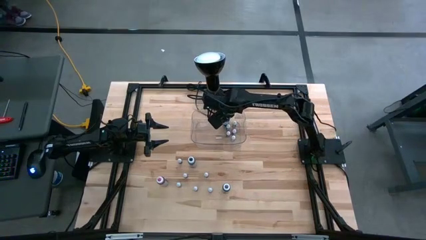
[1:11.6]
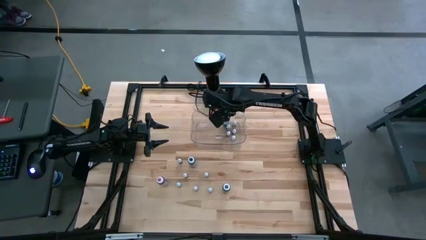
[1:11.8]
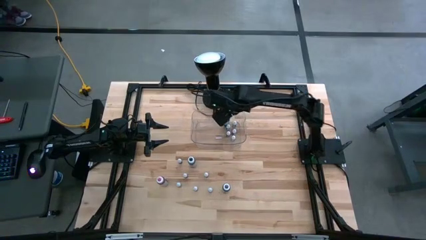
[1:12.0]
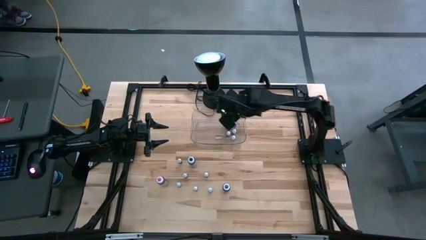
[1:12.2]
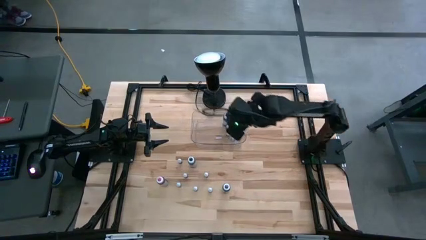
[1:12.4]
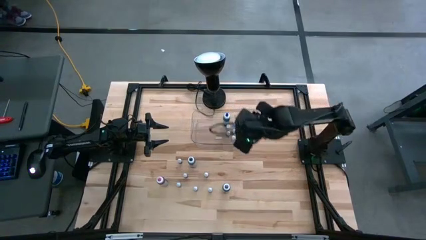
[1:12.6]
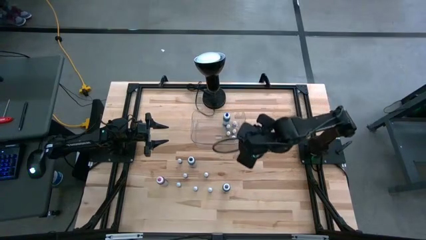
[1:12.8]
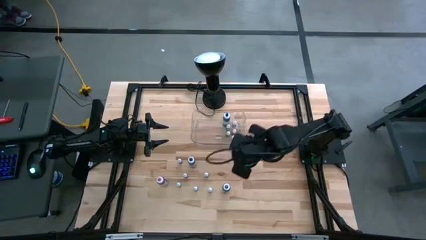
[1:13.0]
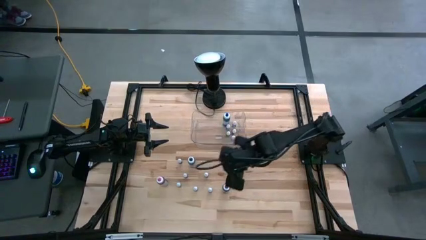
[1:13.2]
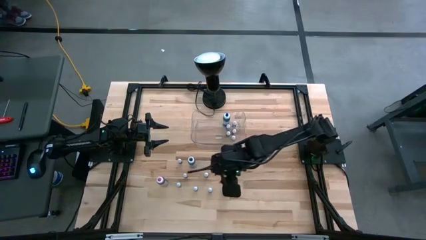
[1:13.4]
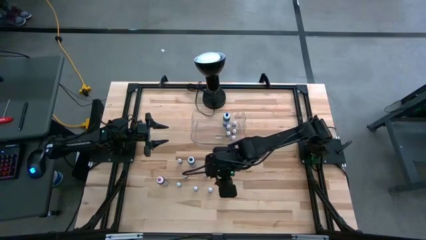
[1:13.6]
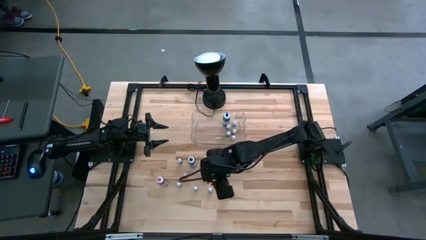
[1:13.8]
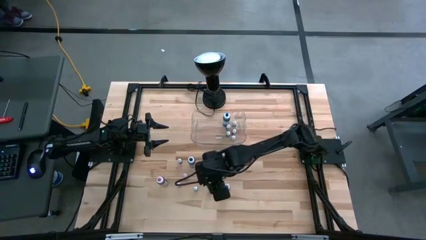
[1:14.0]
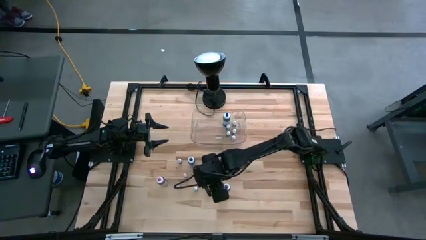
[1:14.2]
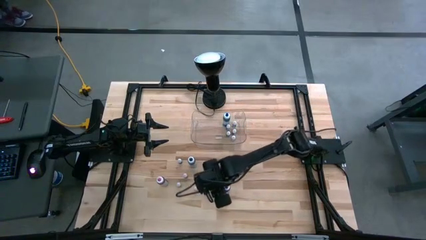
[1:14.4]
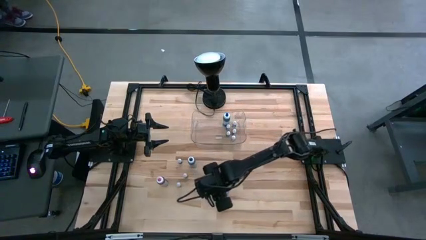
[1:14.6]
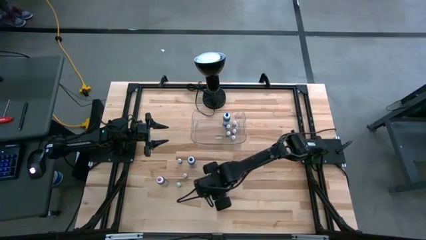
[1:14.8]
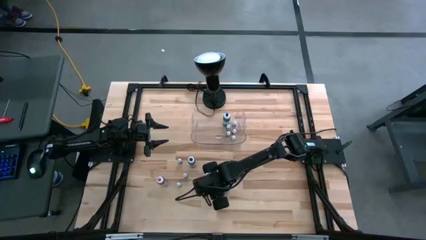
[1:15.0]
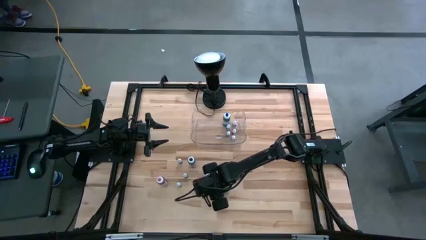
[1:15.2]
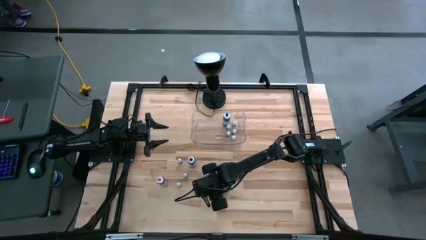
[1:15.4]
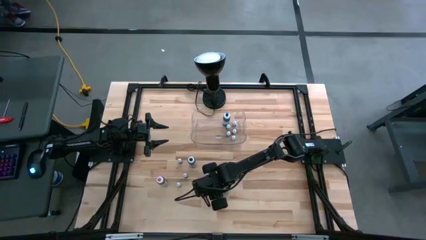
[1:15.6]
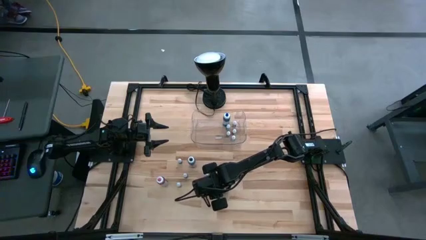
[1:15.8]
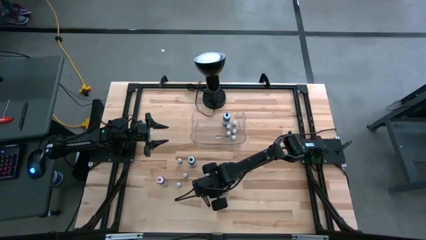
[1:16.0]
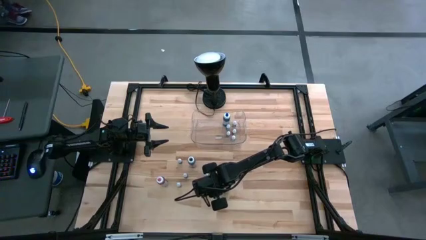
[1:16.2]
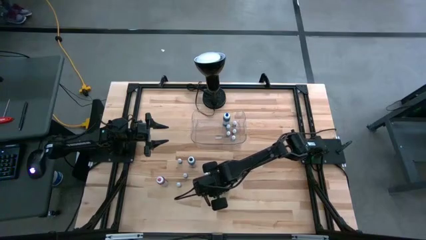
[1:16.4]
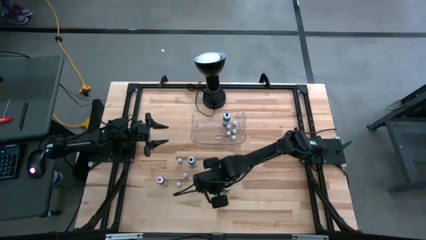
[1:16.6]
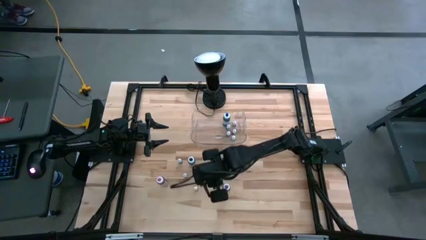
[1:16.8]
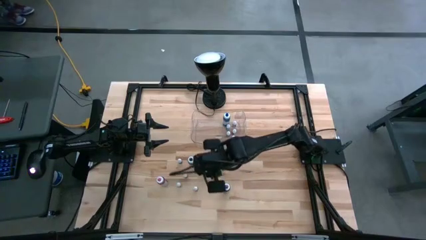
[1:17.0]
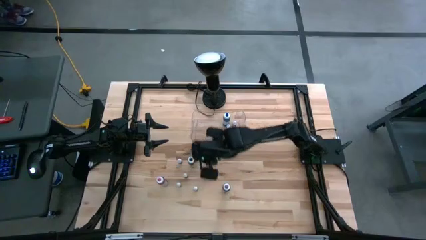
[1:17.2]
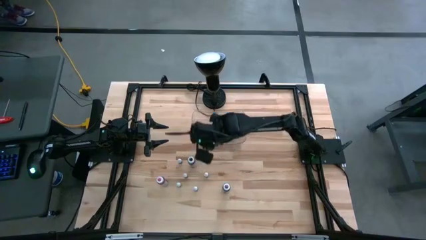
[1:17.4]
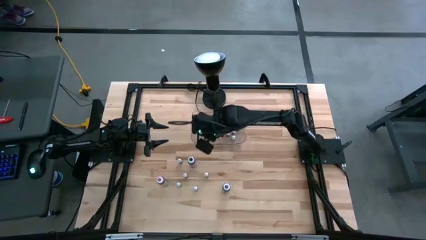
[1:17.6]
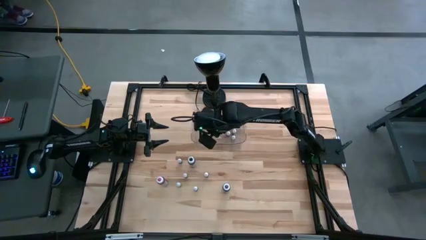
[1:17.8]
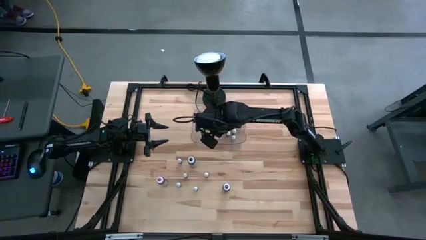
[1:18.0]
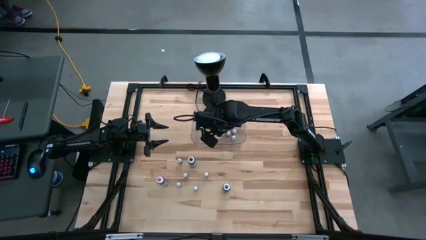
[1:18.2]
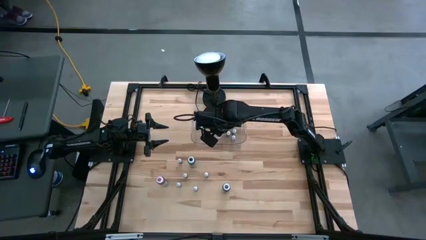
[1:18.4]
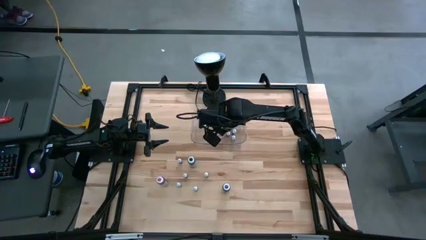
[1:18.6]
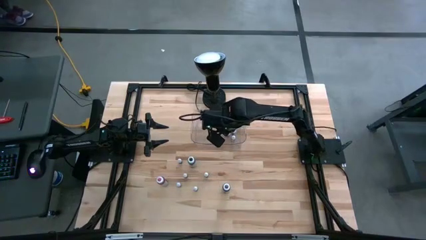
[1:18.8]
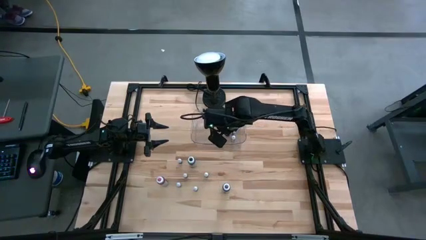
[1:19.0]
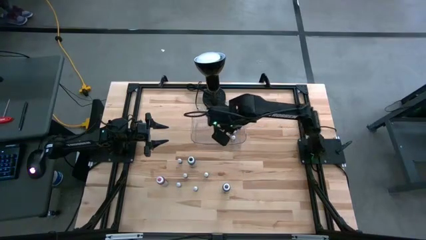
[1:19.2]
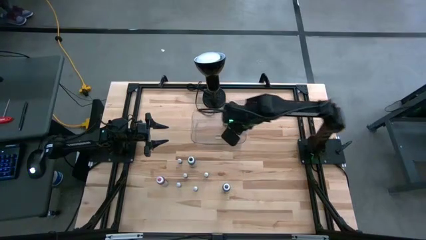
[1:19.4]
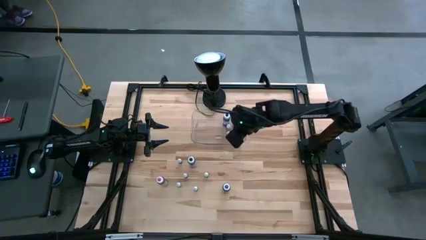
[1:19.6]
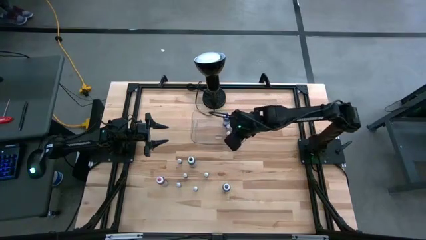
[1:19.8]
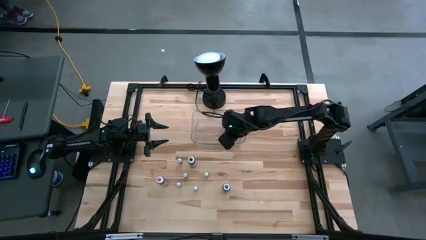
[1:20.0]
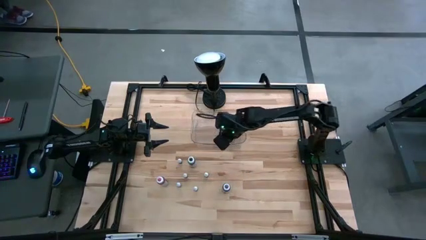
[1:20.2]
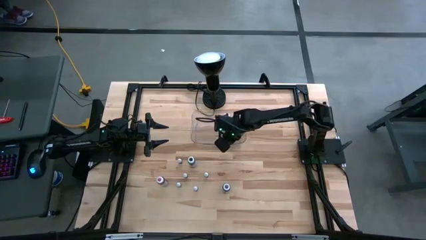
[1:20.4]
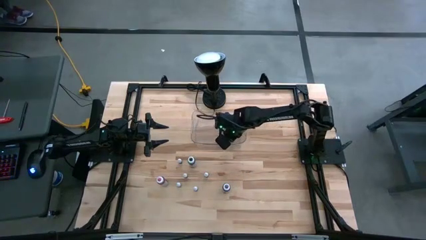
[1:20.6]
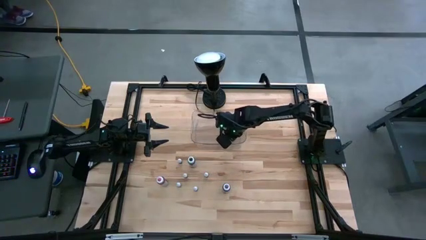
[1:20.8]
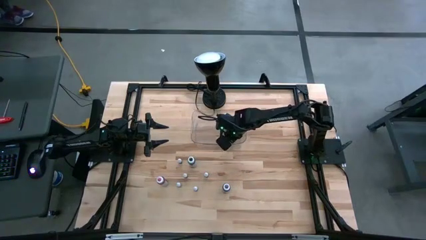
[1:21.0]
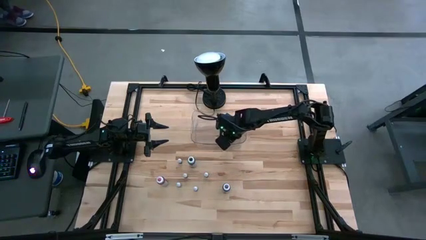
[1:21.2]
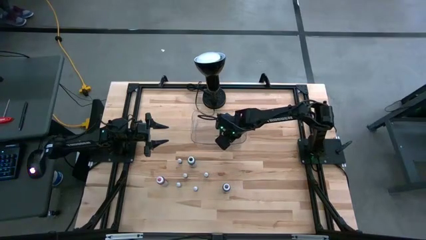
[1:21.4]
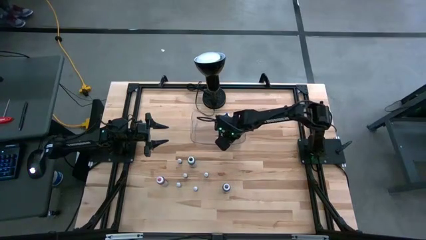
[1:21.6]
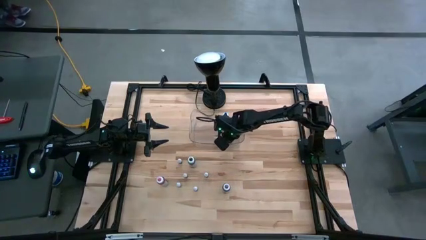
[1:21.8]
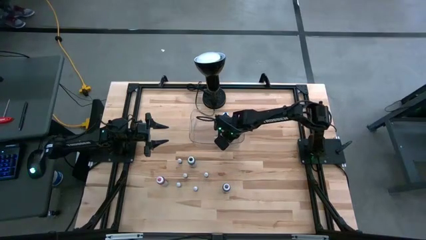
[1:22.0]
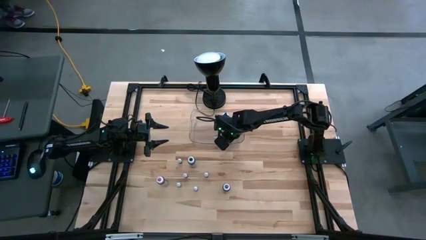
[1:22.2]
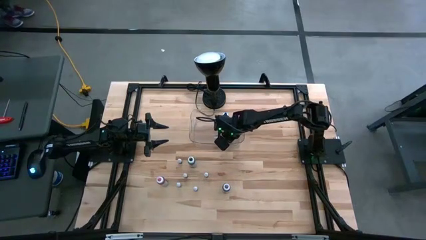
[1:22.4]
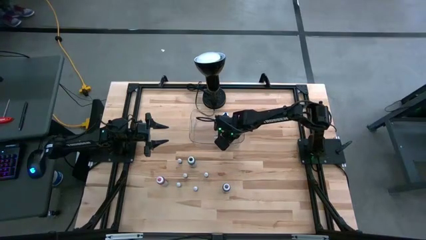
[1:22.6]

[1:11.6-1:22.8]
Task: Pick & Place food coloring
Put the small bottom purple food coloring bottle into the transparent bin
